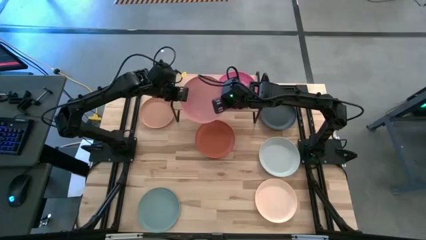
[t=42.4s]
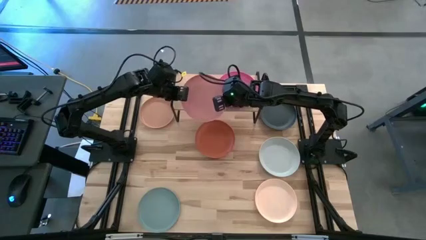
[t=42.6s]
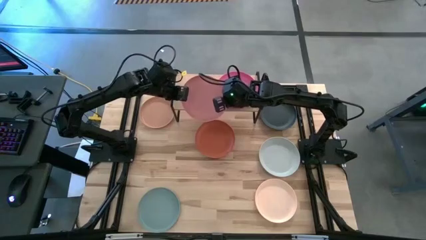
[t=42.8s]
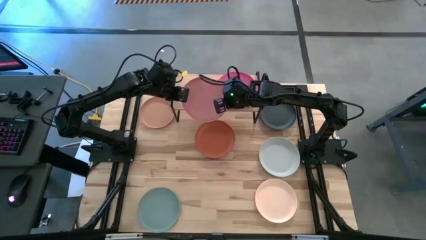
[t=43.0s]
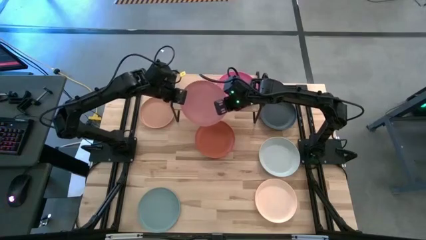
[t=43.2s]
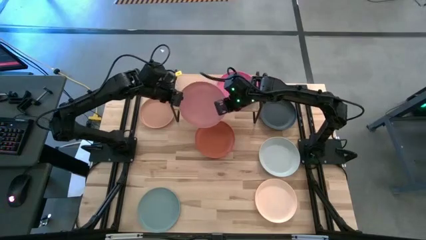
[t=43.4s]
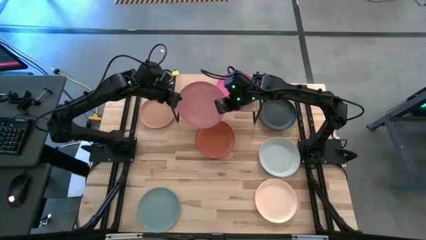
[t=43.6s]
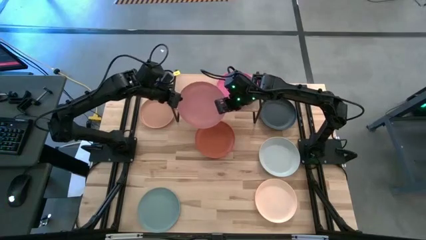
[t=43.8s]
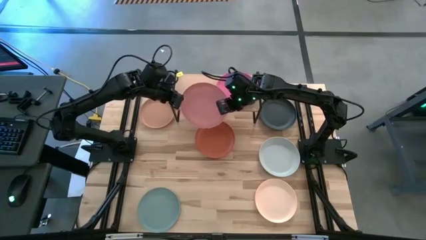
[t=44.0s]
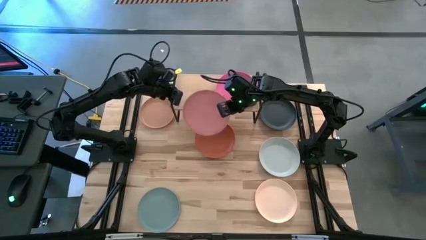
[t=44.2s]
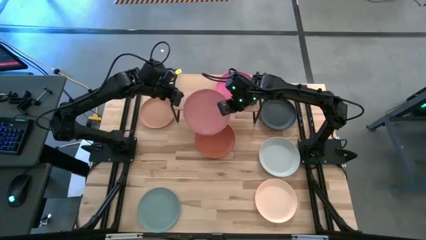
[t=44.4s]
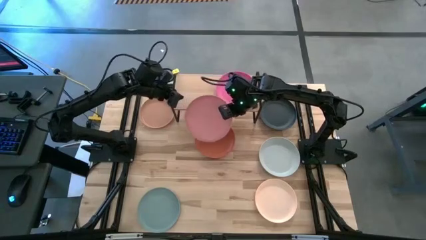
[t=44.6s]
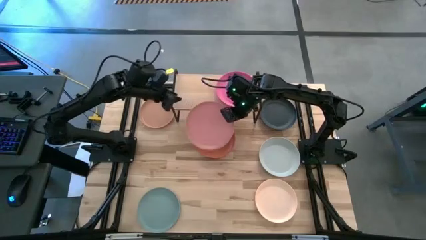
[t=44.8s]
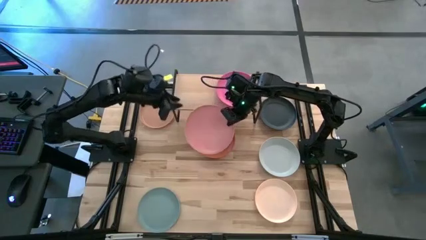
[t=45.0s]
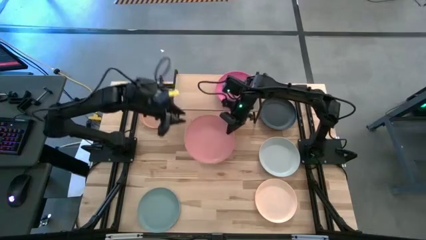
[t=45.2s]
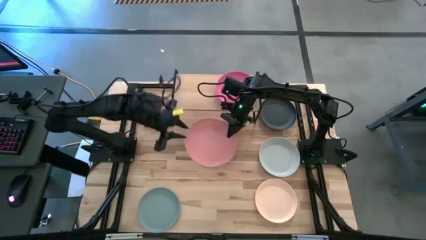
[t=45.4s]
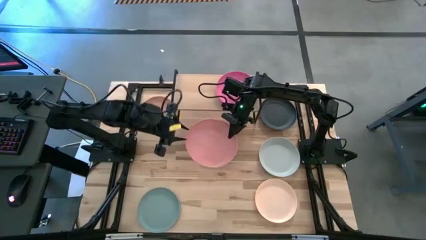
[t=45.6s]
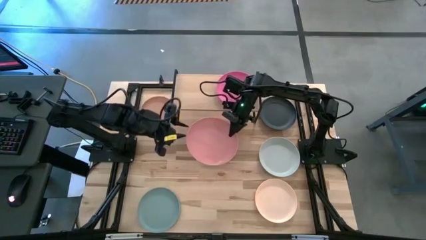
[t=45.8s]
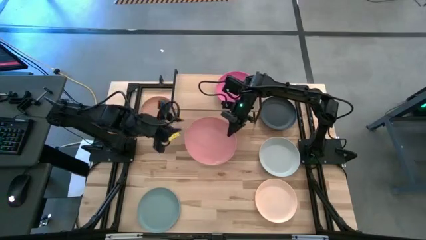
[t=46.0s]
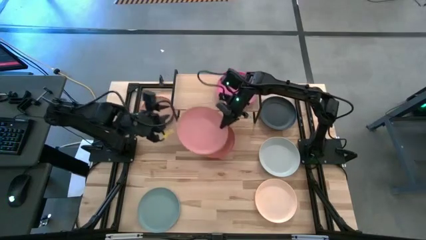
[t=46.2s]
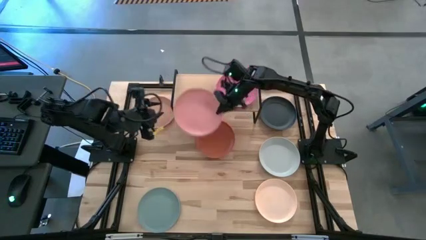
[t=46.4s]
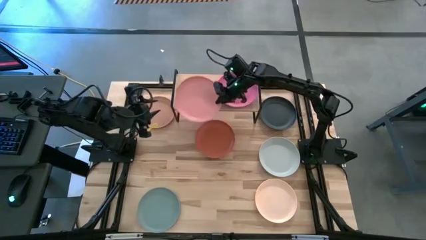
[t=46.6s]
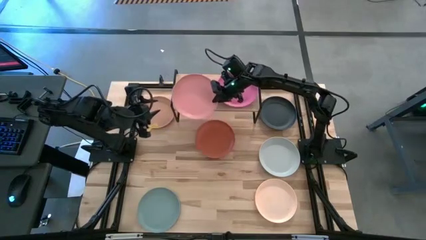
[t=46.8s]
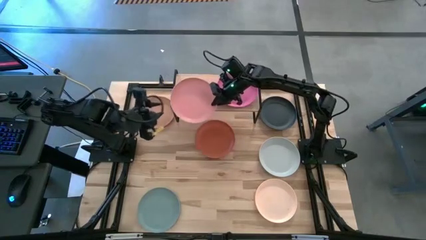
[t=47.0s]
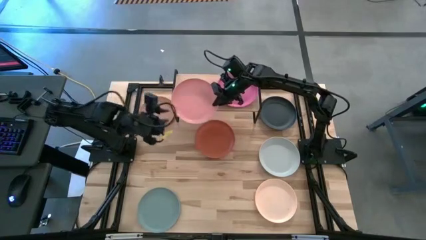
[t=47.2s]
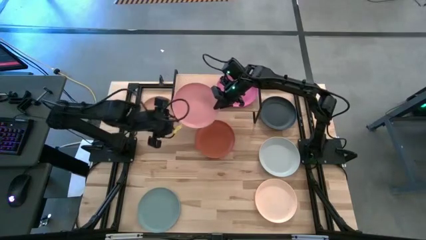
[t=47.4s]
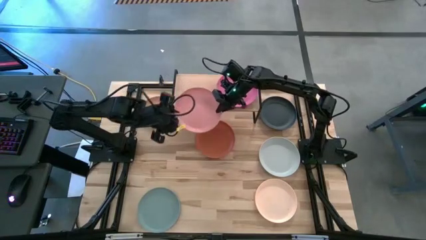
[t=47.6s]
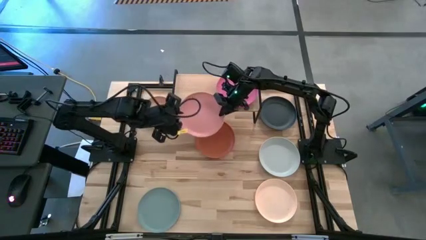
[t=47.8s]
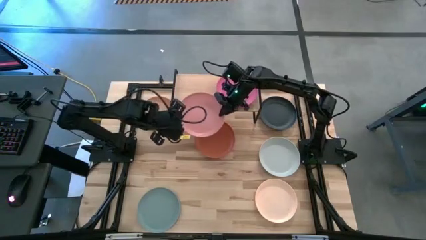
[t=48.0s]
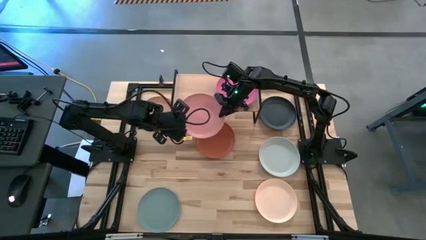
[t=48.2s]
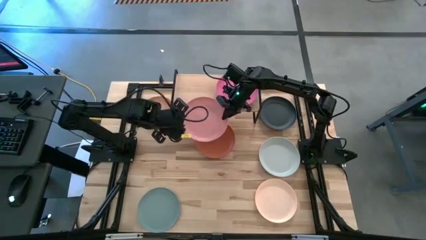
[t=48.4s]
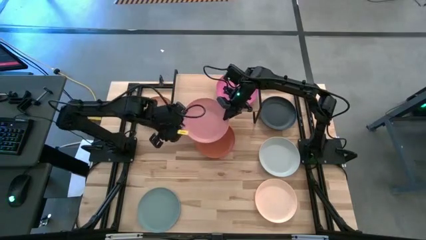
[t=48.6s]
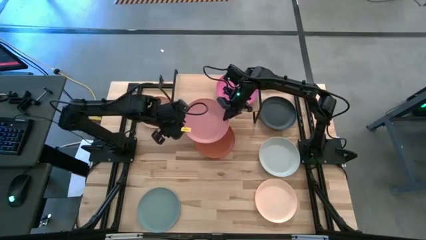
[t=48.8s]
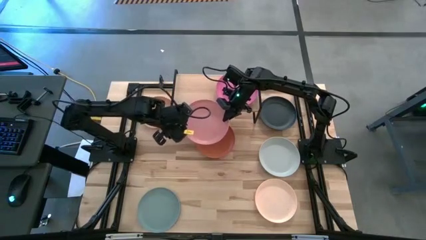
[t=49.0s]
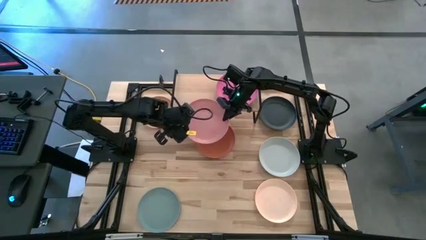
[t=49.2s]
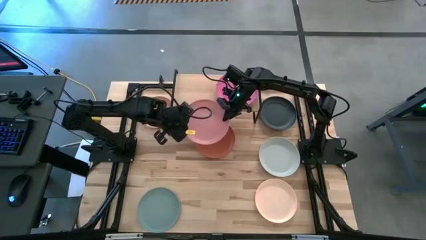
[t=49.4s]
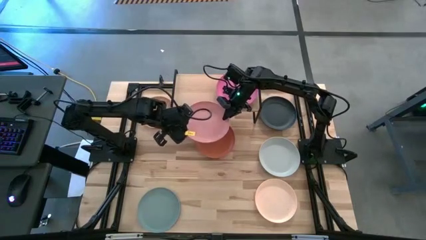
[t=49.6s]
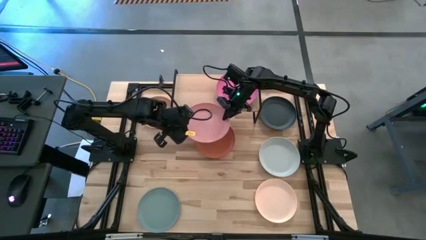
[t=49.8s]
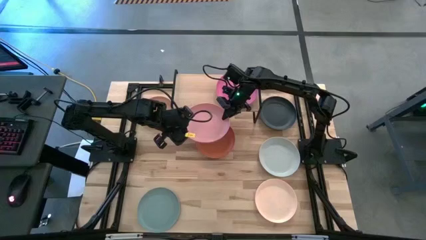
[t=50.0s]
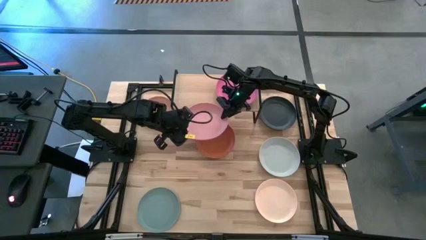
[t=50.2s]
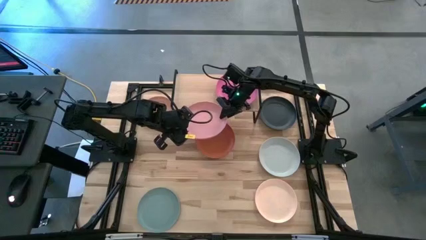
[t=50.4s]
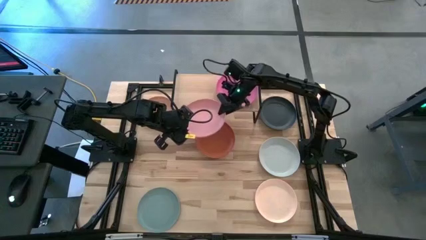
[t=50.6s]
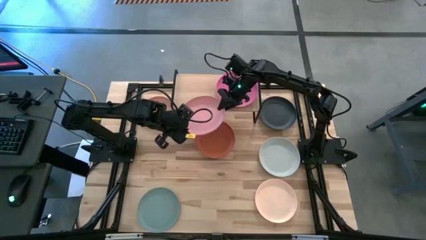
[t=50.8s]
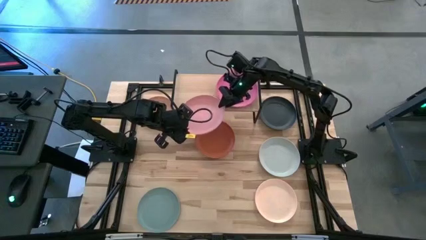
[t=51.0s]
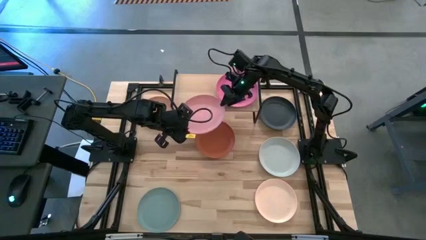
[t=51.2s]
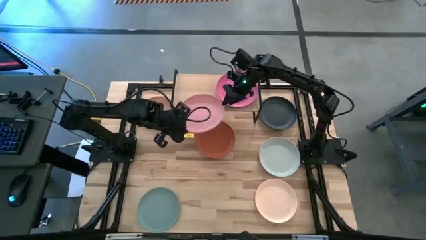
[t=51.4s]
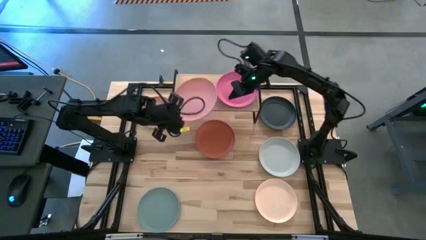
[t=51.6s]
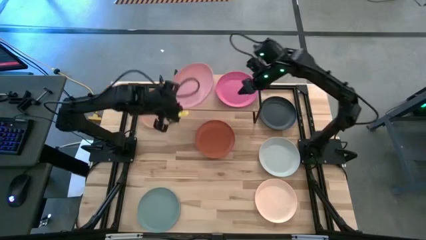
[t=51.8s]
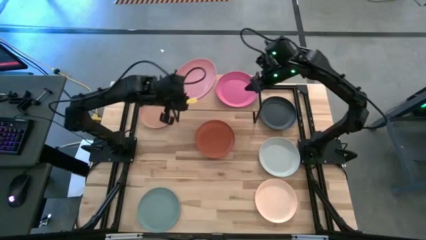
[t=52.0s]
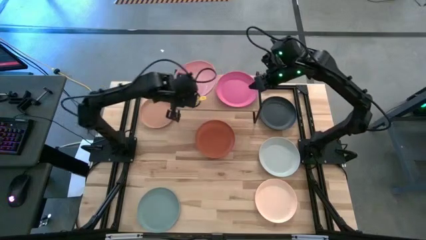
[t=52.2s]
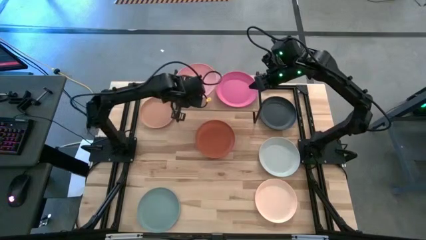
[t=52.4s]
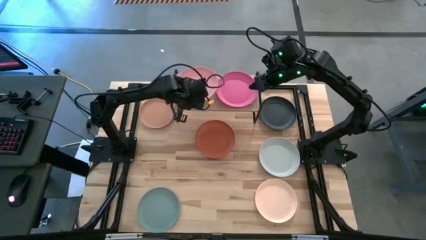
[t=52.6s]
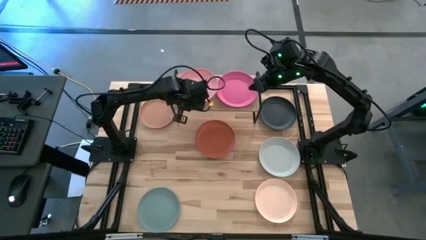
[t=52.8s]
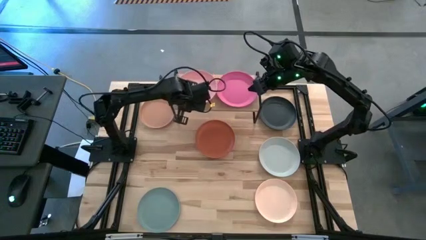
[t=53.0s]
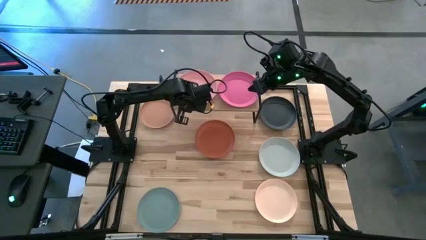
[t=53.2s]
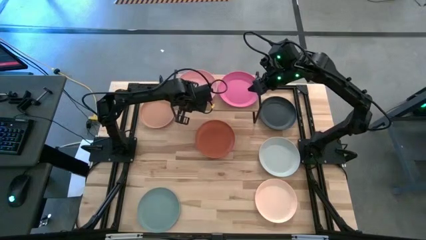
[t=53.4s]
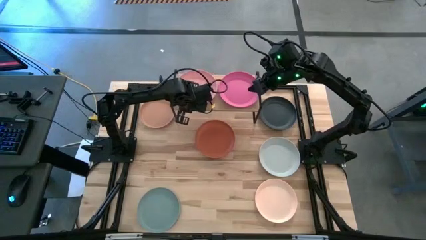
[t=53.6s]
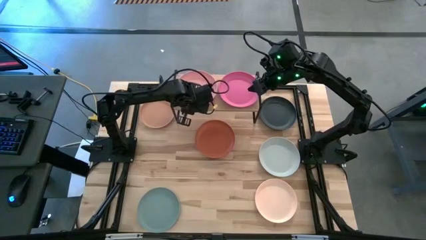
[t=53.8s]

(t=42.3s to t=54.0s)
Task: Place and stack plates onto a shelf
Put the light pink plate on the shelf

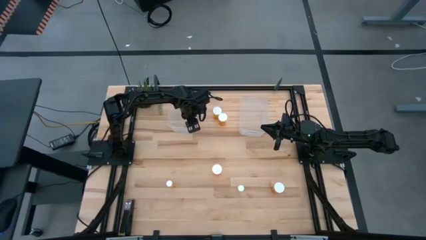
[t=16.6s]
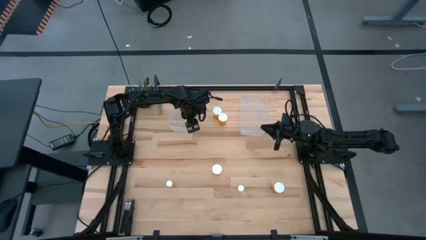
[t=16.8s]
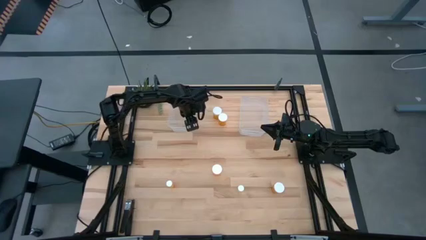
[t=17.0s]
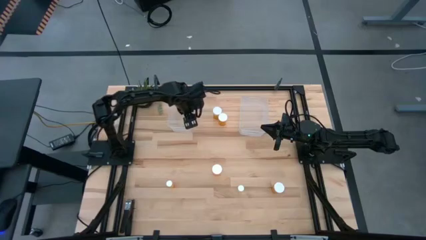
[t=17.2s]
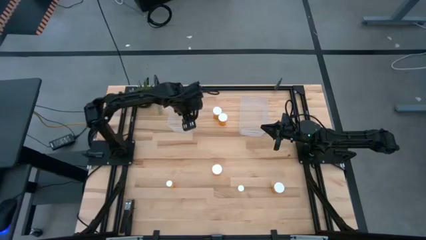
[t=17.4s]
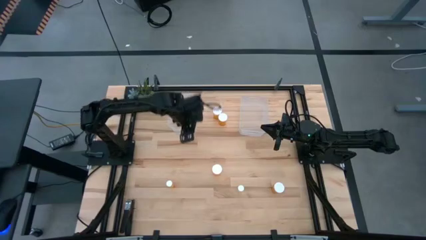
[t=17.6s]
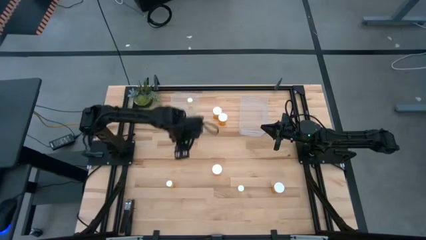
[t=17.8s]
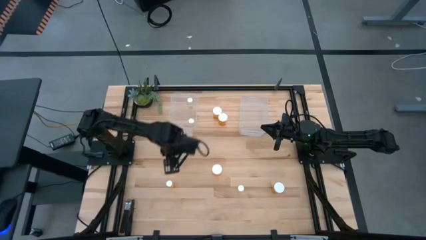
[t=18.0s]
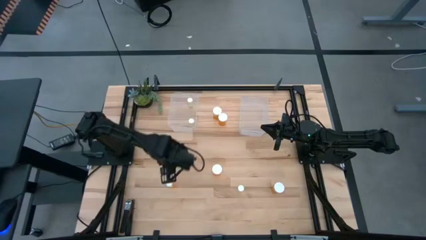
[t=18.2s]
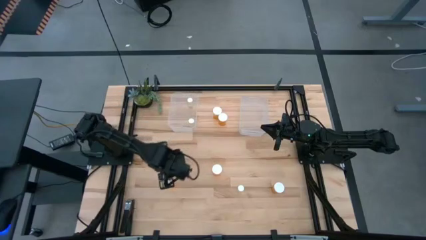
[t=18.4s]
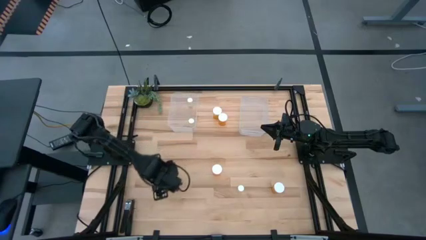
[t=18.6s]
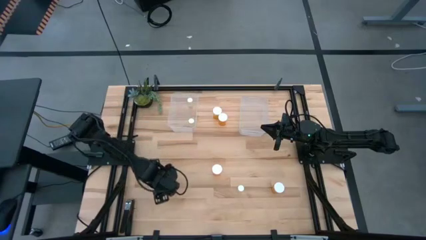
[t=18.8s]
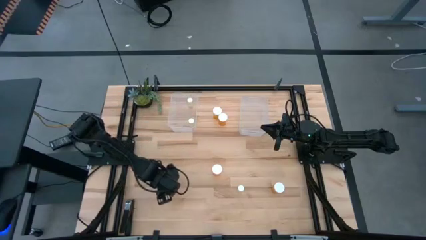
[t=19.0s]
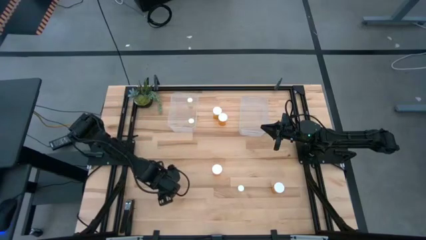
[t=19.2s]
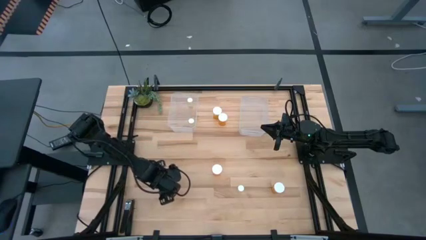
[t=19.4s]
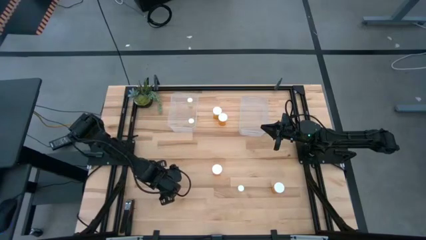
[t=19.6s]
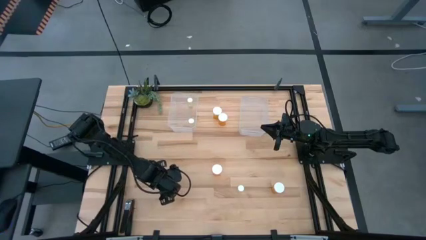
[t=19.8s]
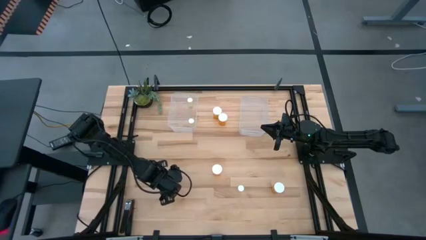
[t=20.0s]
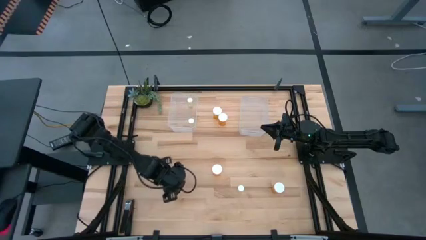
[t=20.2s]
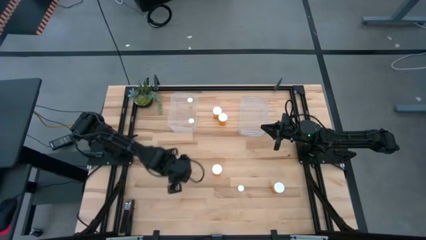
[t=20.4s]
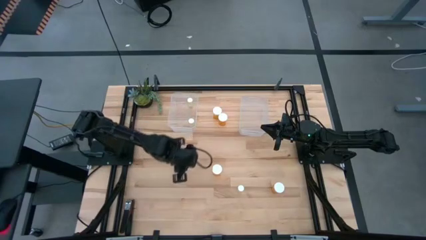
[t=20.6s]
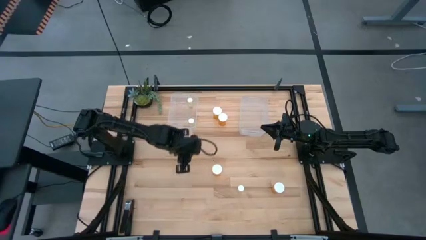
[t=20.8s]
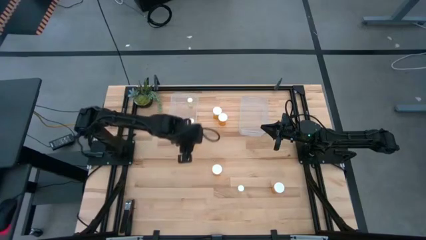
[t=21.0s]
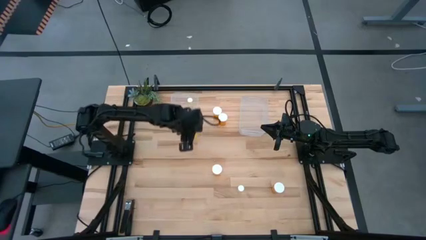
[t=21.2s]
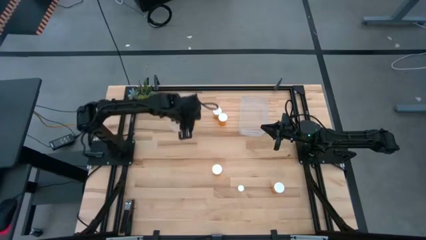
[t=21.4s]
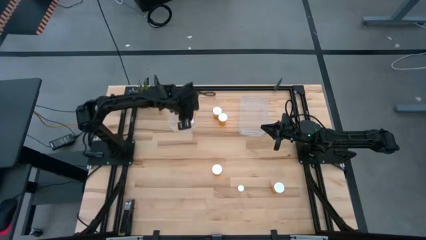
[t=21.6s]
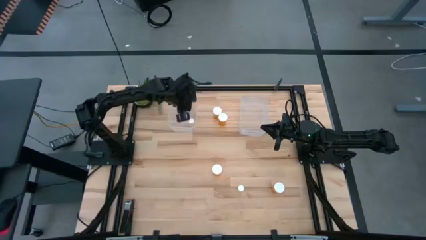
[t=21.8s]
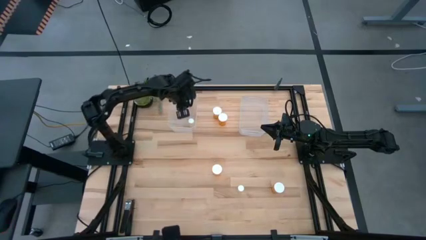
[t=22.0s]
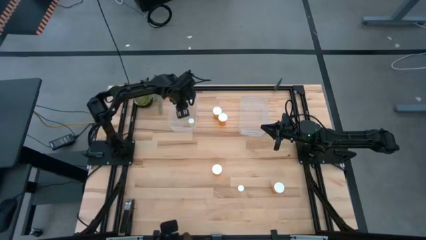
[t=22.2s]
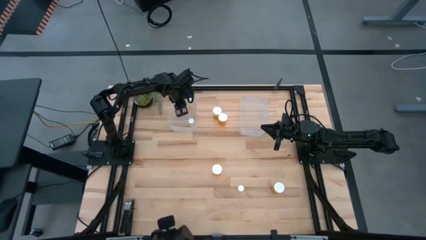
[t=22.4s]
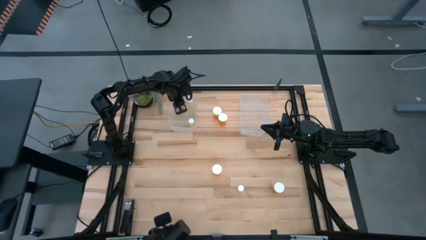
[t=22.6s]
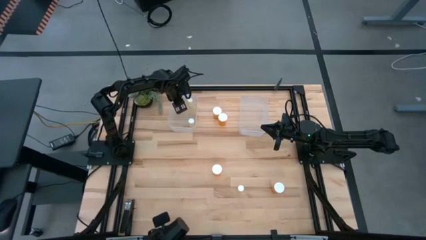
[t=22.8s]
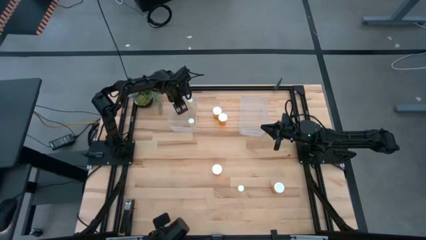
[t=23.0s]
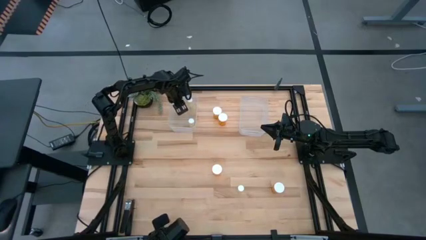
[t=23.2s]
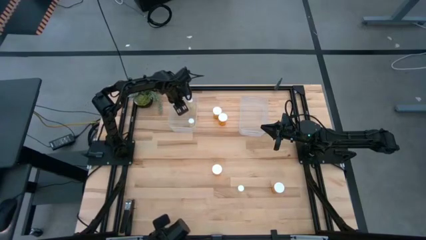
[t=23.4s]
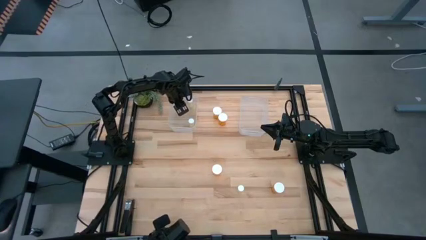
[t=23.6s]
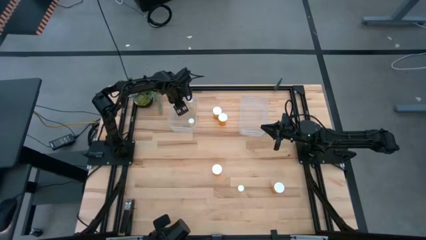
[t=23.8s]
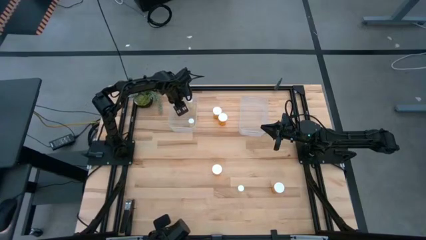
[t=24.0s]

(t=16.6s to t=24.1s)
Task: Pick and place medicine bottles into bin by pill shape (circle, oval)
Put the small orange pill bottle into the left transparent bin
